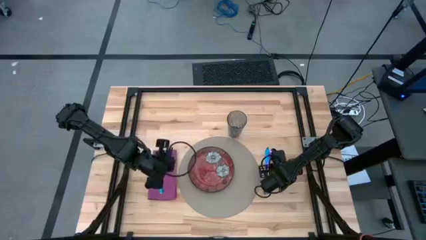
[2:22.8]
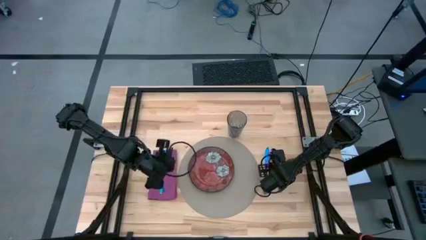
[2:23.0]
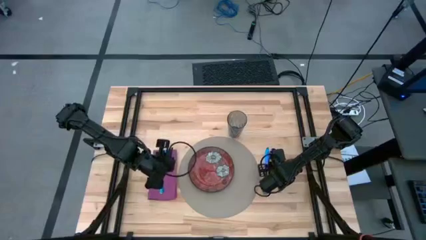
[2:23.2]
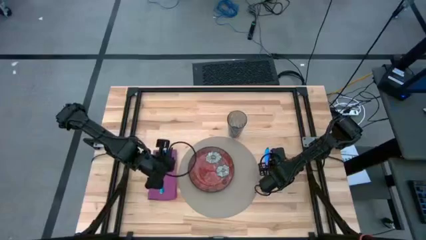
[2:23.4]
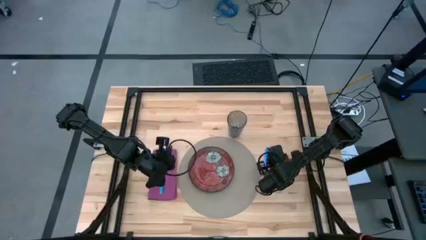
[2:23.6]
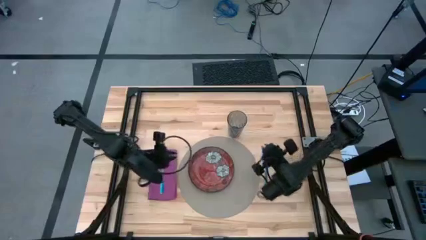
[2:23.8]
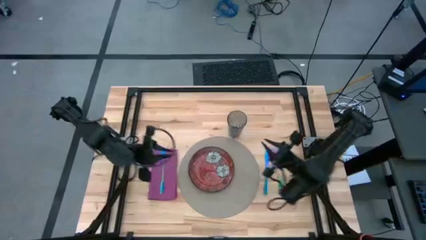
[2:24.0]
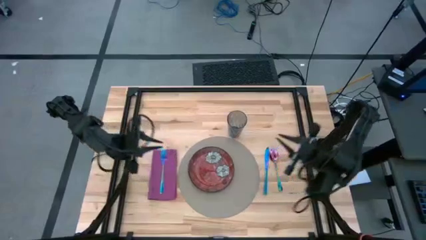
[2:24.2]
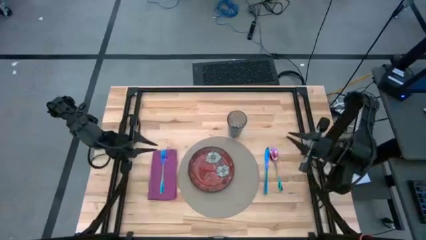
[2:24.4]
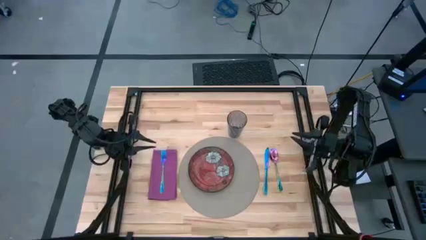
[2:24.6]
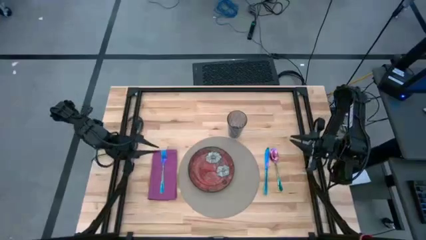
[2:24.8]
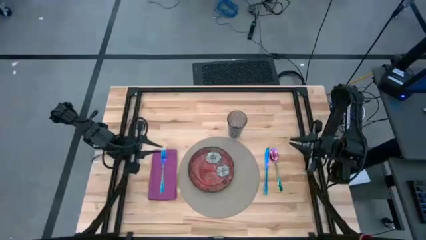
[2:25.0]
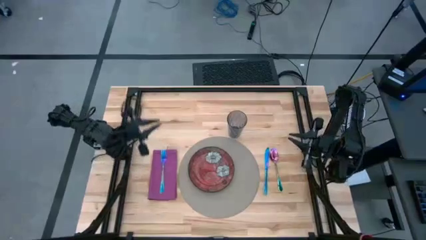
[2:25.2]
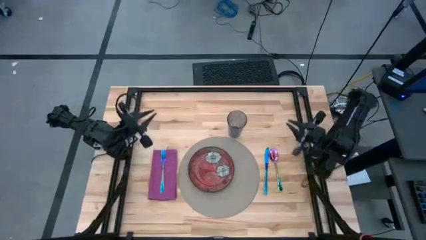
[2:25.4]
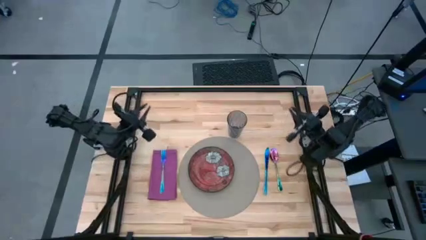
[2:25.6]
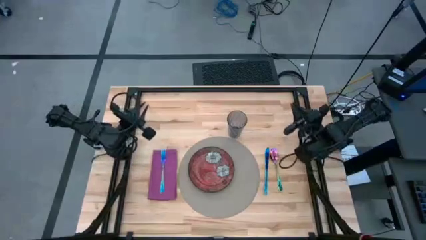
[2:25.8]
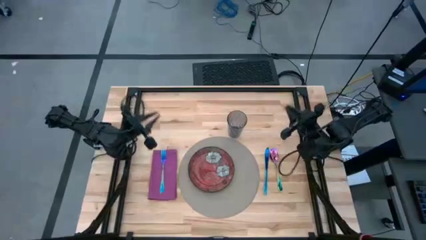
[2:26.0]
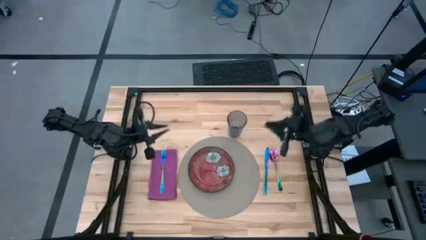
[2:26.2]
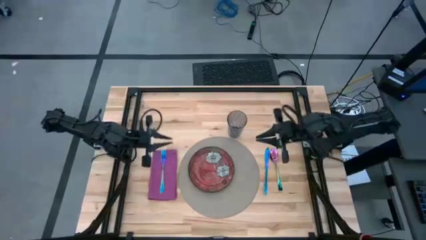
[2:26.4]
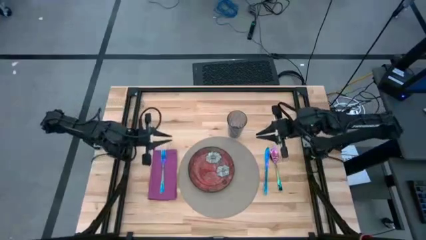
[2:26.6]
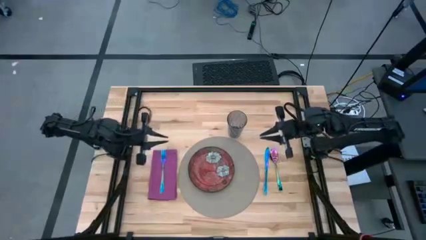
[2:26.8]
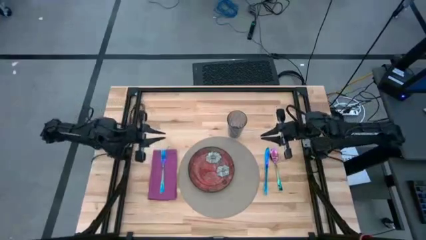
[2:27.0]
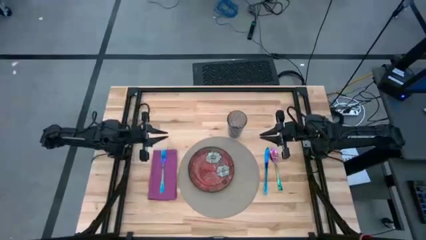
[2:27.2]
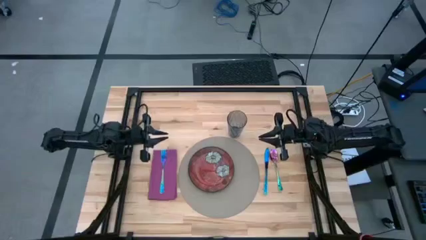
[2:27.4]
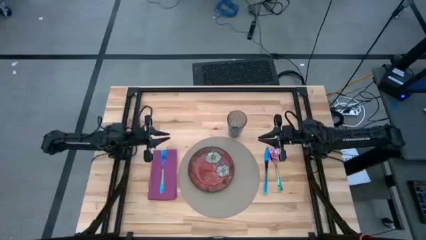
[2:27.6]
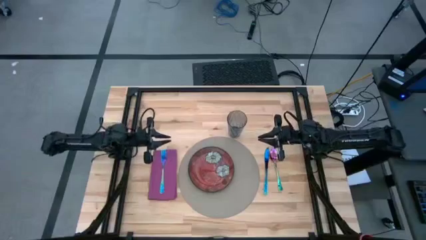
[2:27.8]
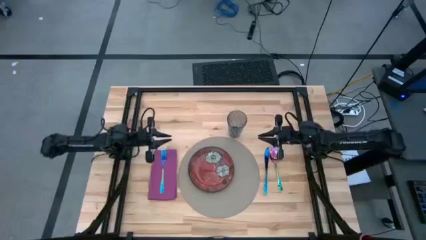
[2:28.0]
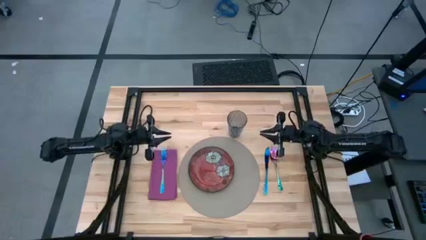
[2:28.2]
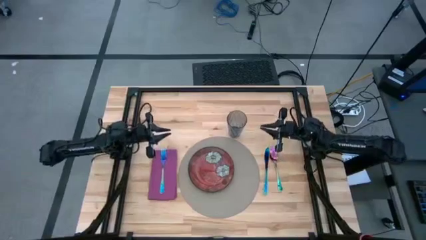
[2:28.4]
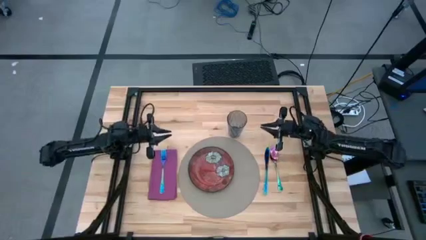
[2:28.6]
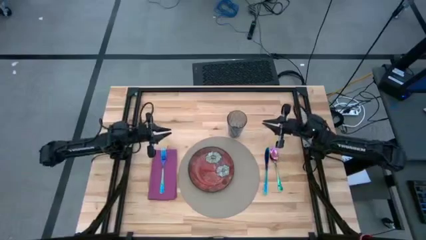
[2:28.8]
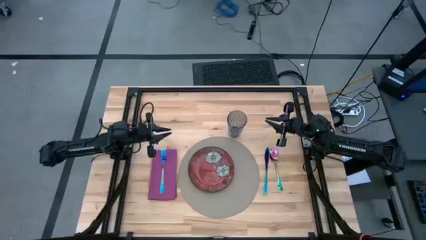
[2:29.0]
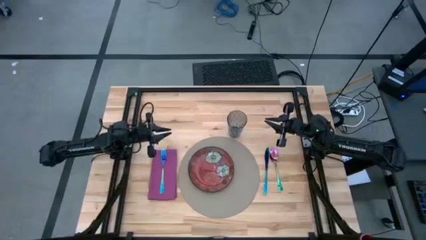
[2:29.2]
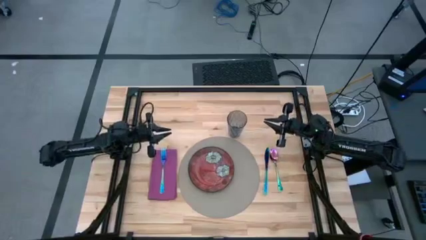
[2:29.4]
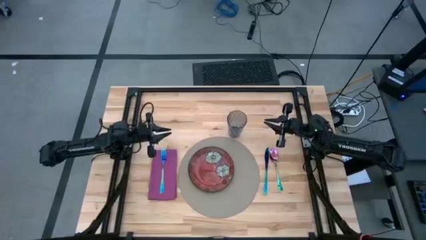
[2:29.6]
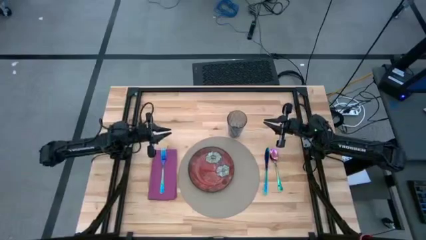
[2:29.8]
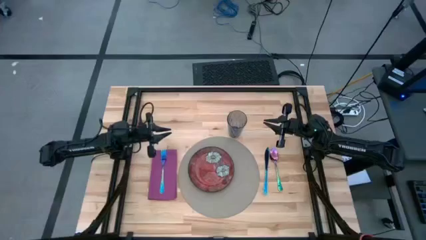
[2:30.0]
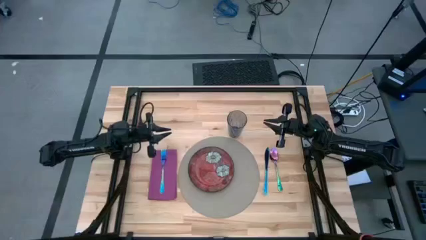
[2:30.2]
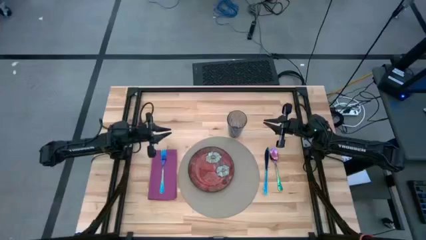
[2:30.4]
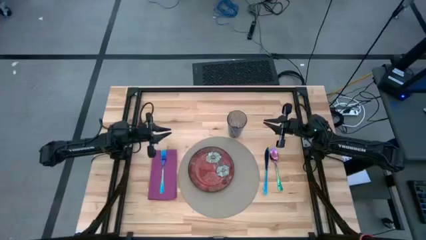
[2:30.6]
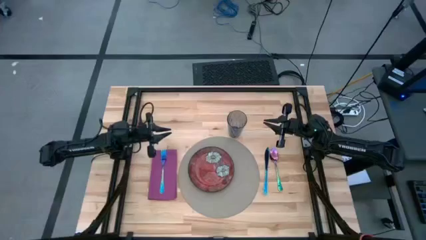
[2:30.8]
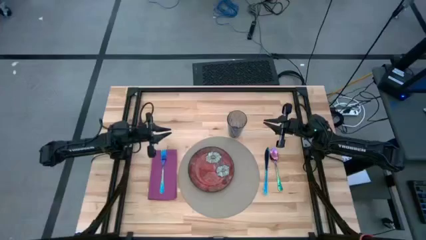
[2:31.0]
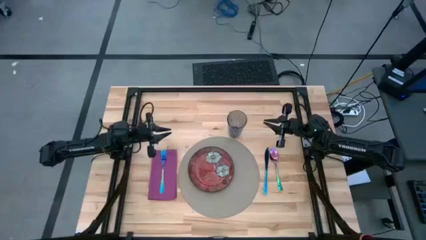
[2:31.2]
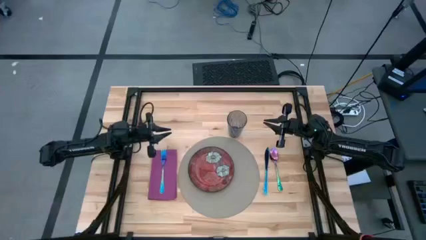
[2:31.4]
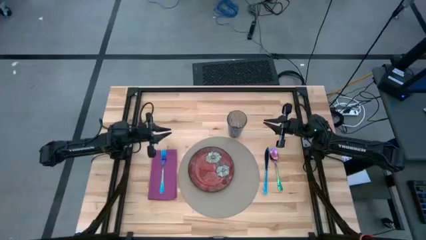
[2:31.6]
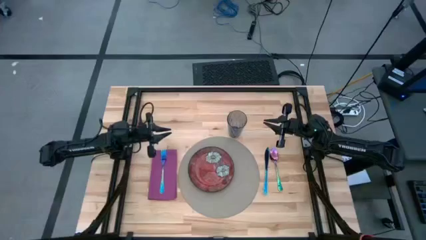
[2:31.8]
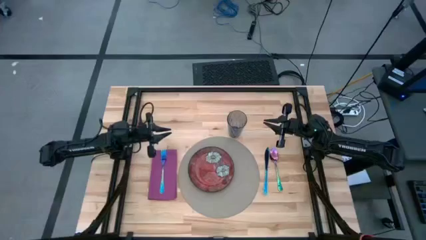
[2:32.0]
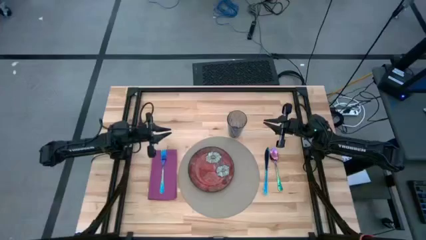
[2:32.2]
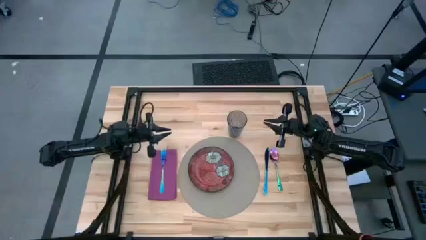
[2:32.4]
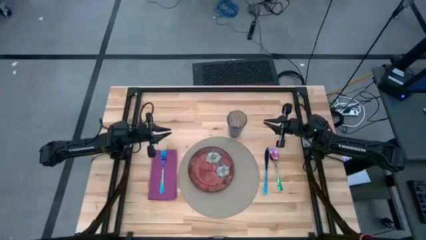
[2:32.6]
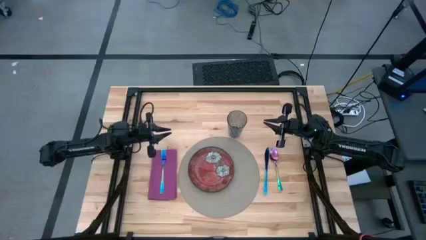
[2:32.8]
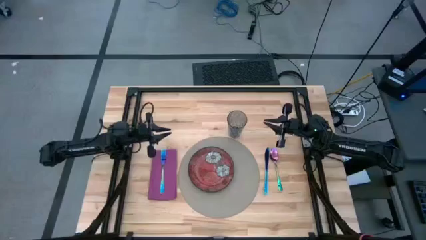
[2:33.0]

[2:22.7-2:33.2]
Task: Set table place
Return to Home Position

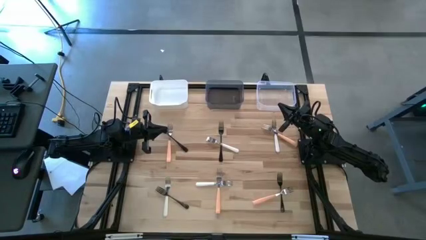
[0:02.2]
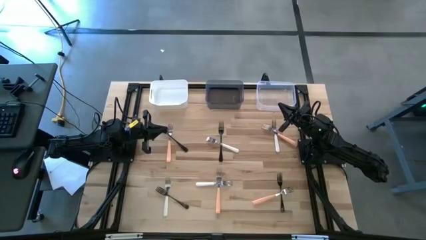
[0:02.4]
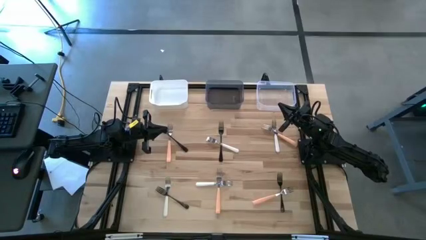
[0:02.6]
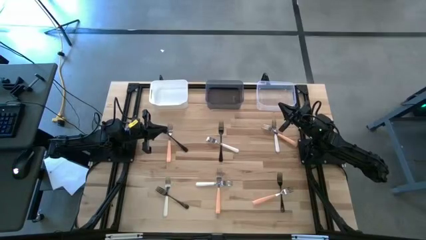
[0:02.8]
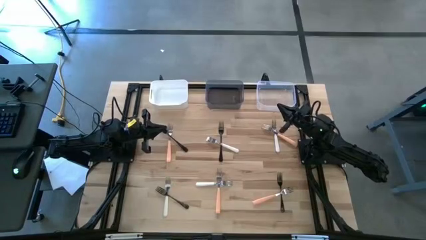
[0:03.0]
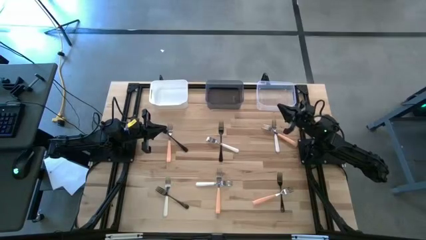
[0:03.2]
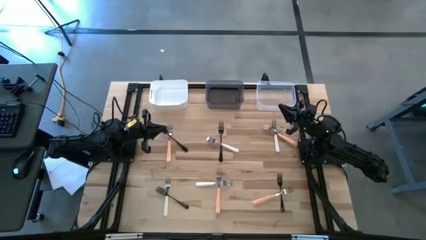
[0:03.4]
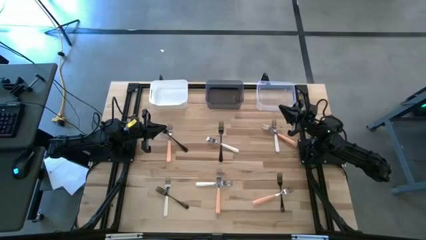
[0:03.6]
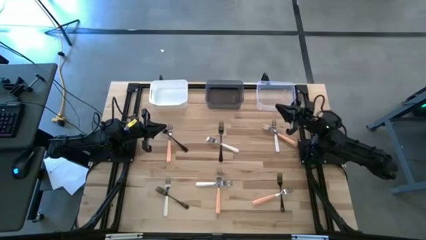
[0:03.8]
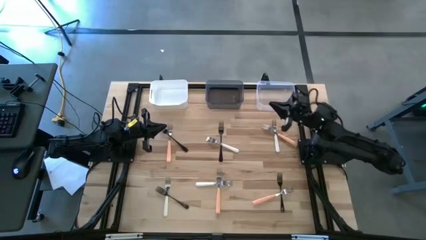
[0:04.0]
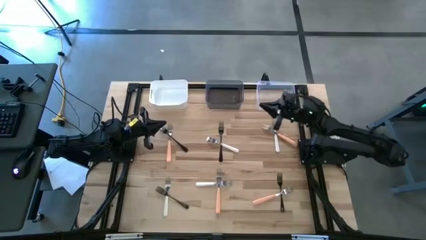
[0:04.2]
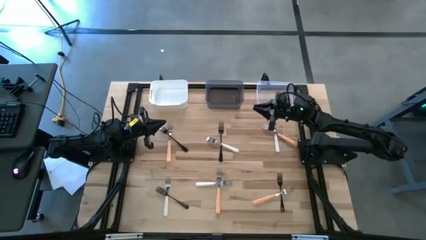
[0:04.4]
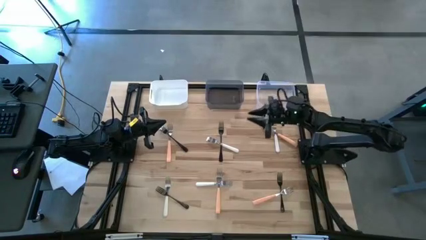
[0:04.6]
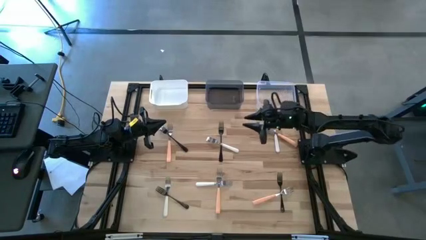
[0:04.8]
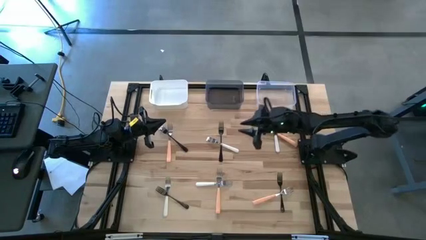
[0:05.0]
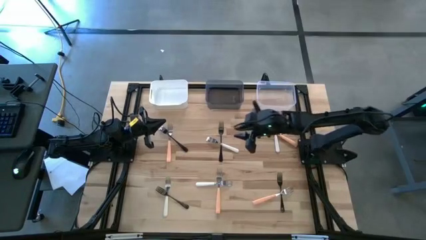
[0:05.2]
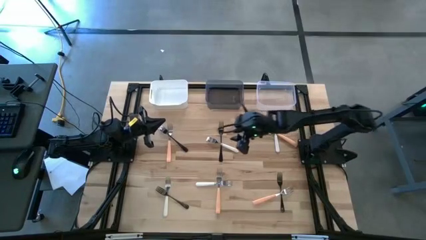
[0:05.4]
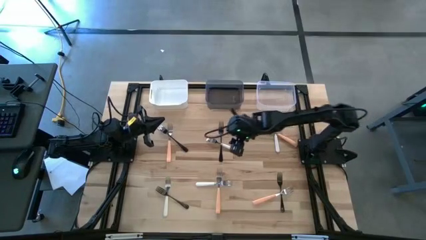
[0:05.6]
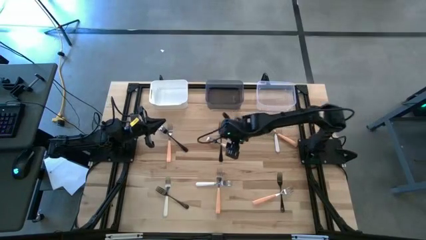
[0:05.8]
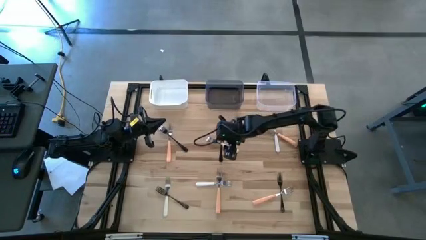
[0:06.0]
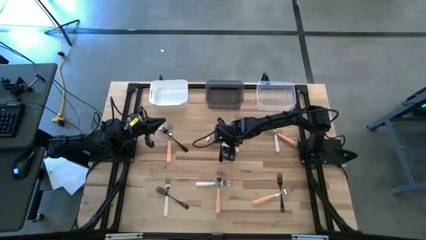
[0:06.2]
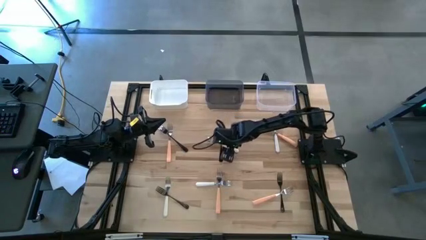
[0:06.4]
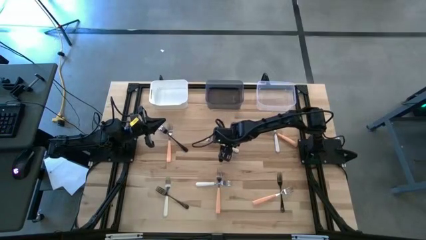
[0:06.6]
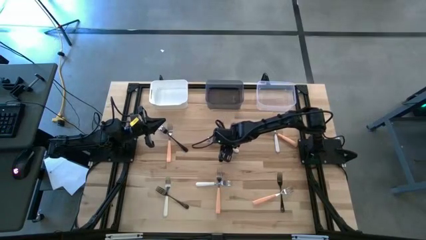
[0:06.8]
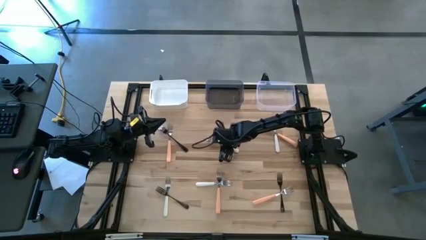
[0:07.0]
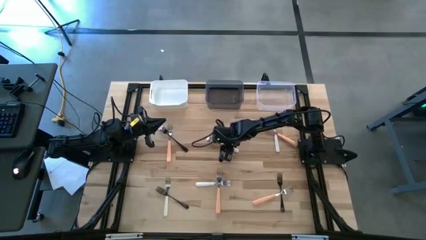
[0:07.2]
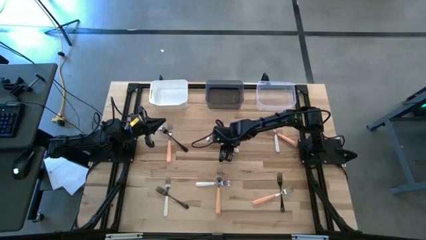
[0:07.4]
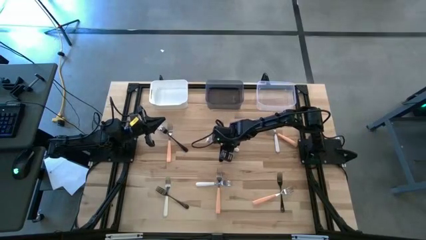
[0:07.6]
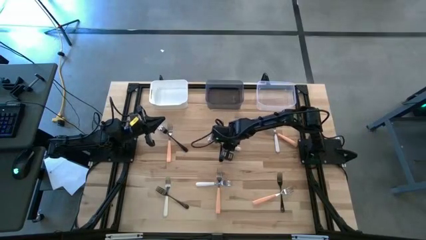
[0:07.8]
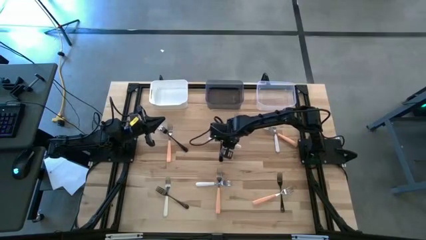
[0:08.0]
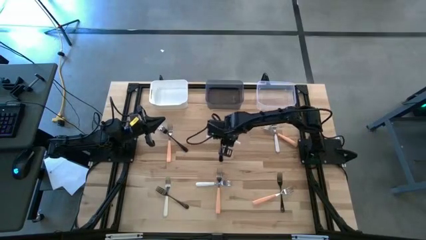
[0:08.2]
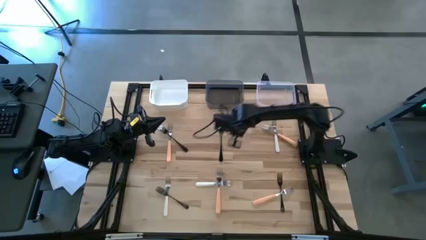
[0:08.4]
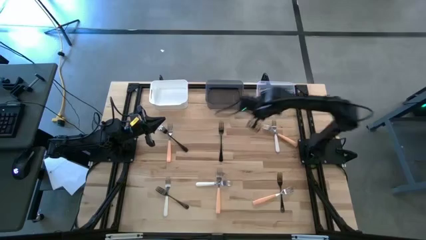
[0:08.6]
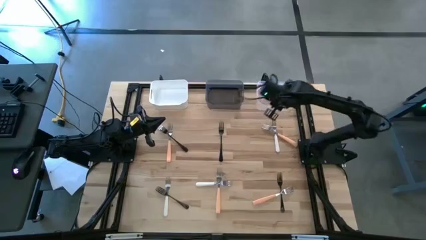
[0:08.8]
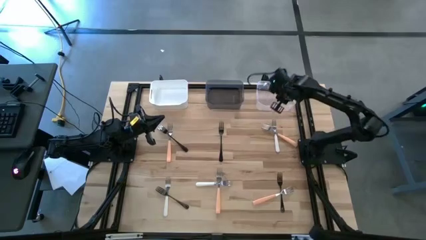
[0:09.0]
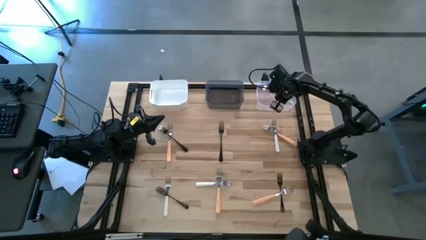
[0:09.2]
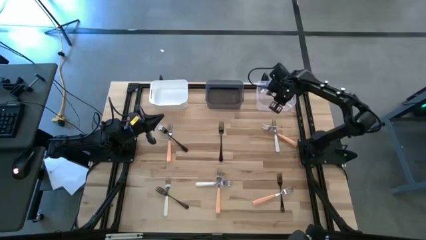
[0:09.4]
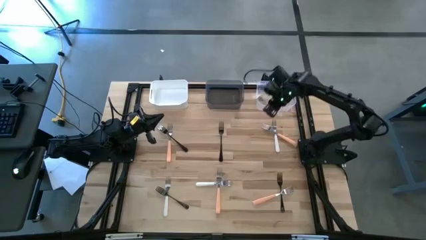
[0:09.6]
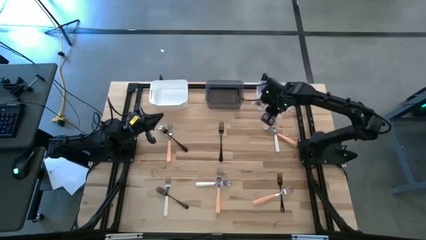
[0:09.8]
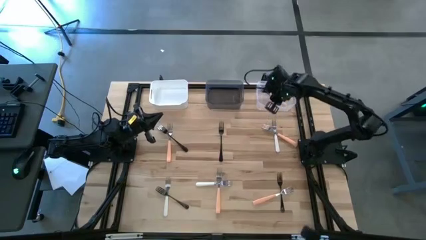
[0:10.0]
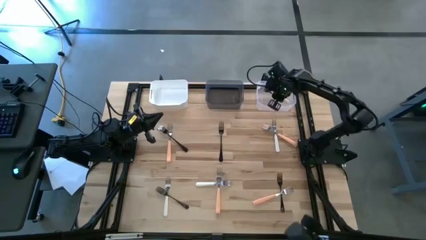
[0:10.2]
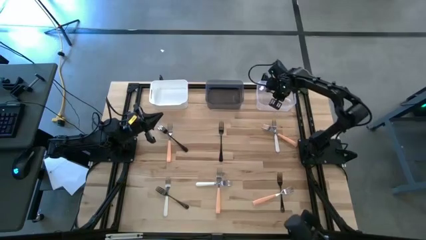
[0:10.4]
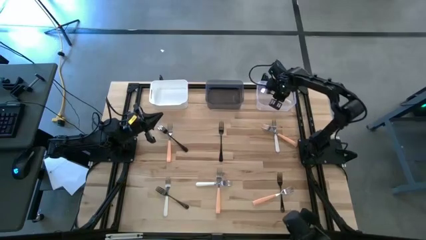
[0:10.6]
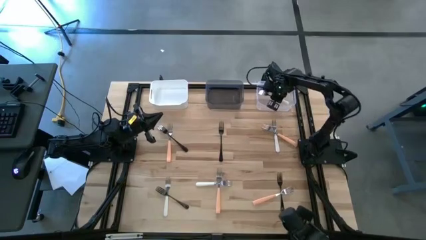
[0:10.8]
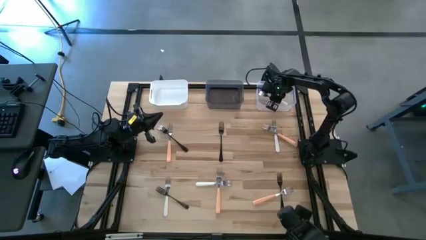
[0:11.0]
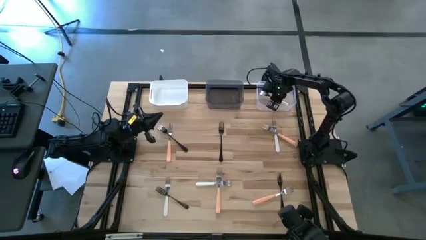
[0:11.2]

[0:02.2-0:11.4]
Task: Sort silverware by color (type)
Put the top left white fork into the transparent bin
